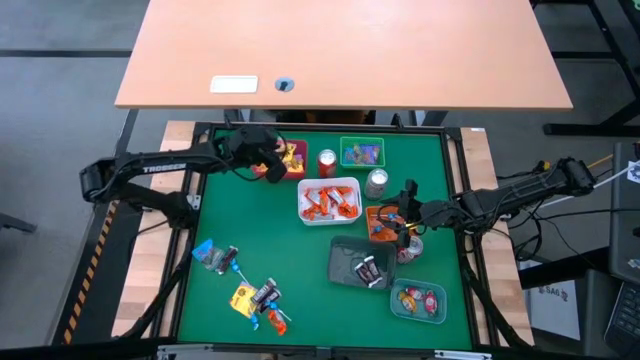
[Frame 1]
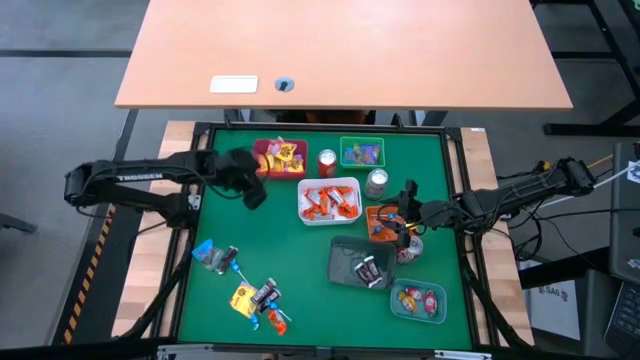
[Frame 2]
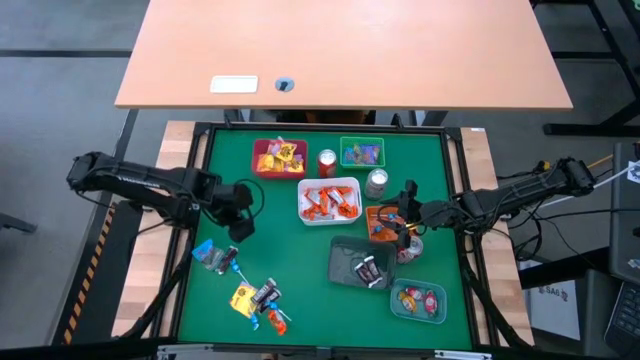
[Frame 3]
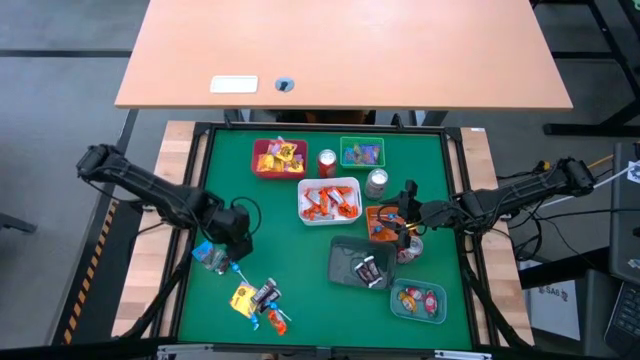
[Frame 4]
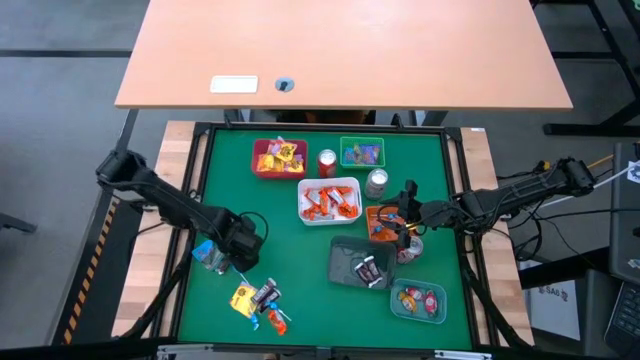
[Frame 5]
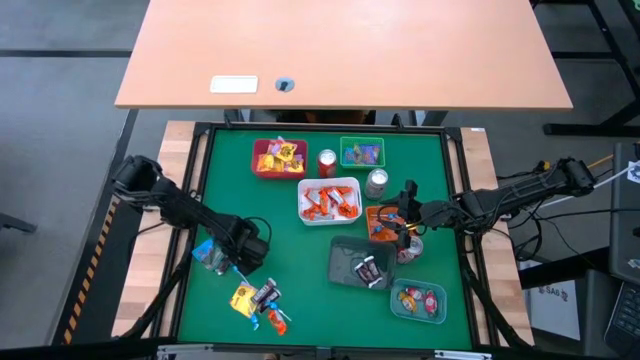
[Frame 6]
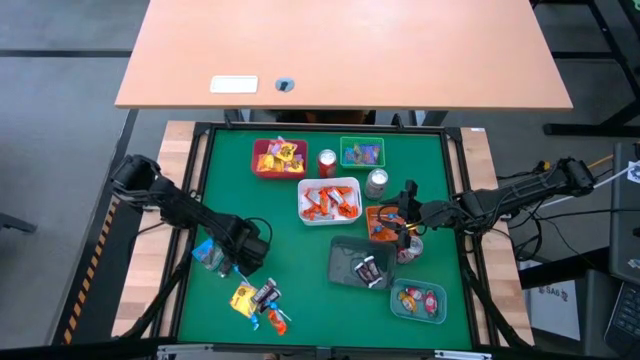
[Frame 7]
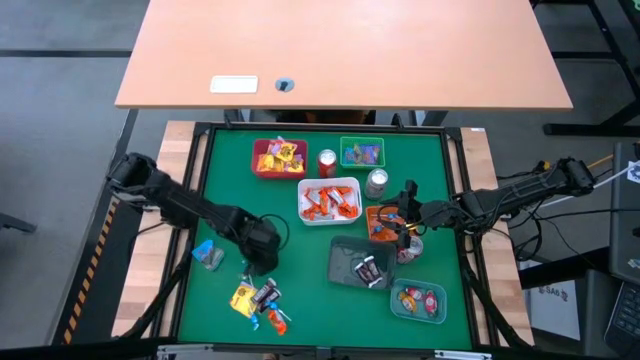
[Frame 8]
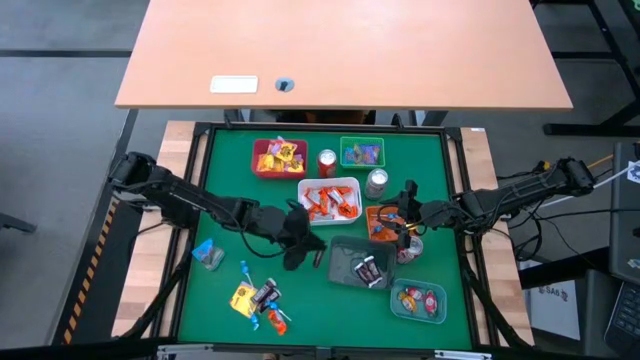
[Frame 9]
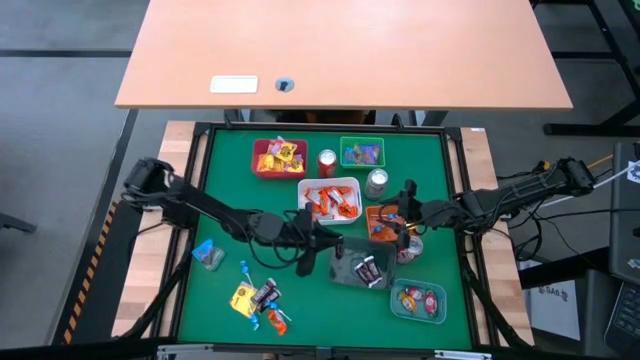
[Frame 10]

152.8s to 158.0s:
Task: Sort candy
Put the brown chocolate bar into the black bin

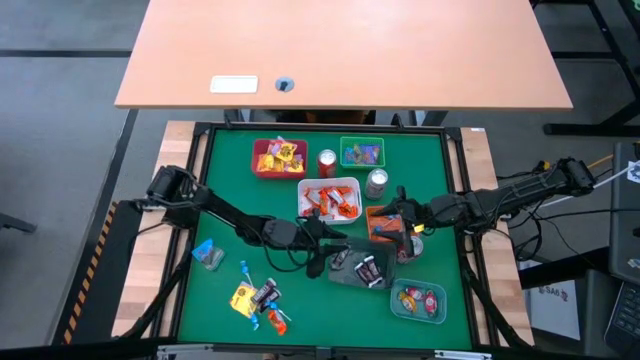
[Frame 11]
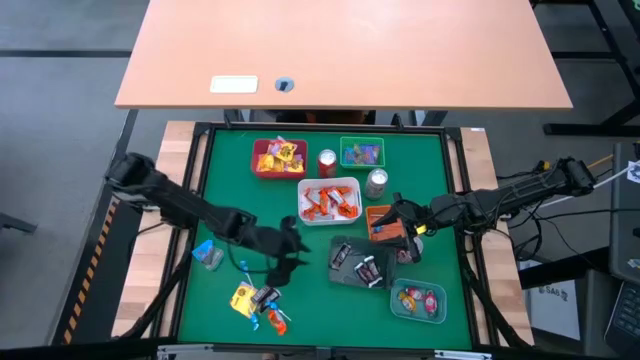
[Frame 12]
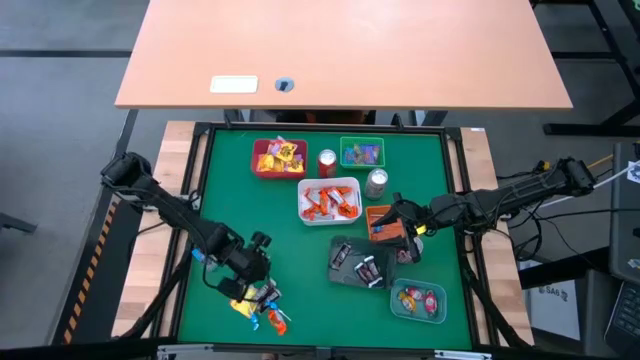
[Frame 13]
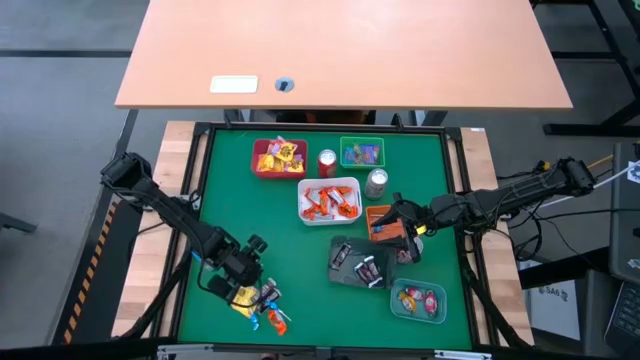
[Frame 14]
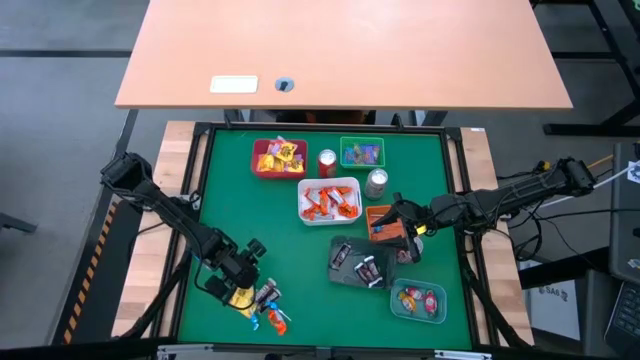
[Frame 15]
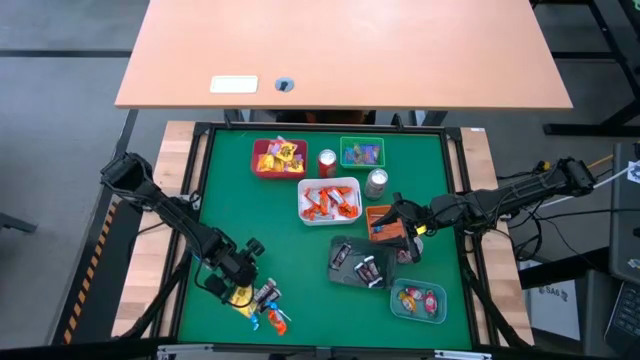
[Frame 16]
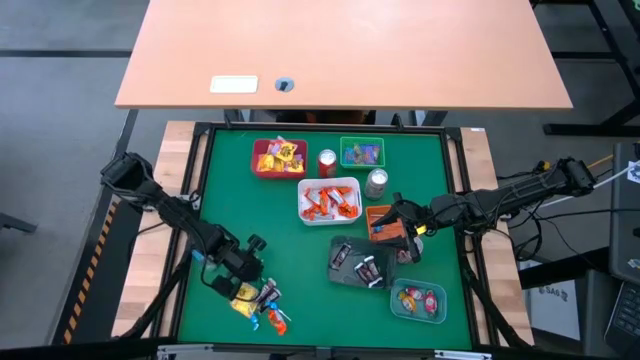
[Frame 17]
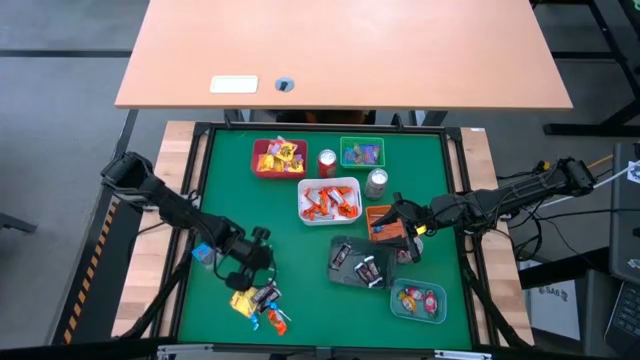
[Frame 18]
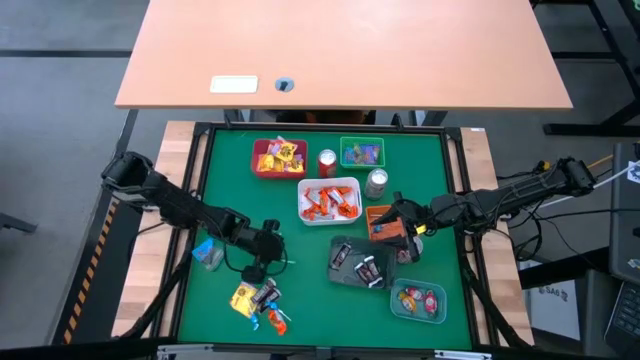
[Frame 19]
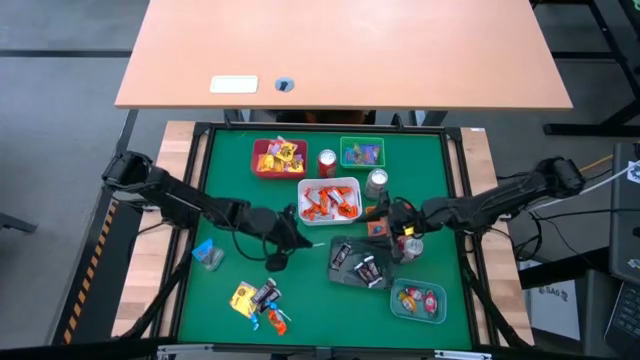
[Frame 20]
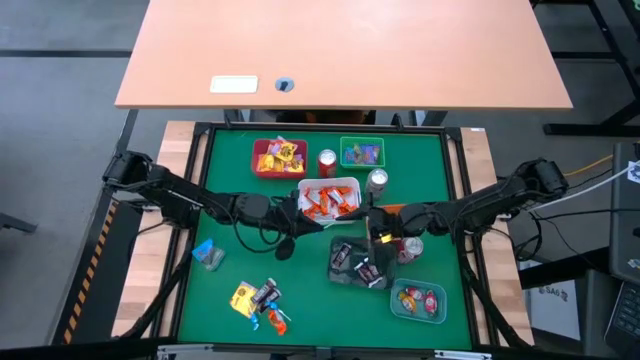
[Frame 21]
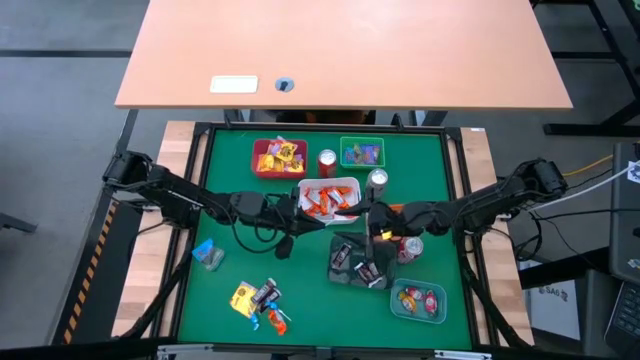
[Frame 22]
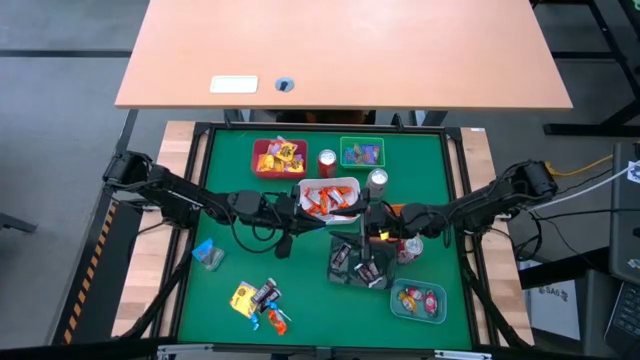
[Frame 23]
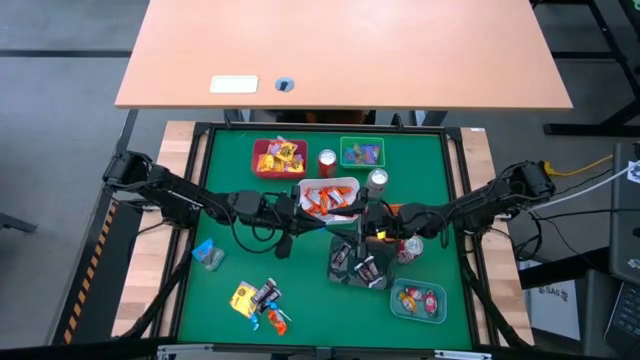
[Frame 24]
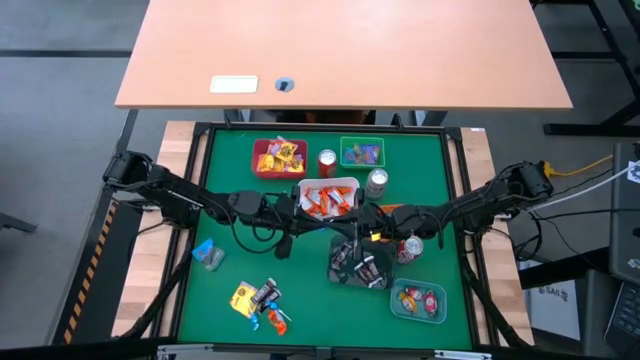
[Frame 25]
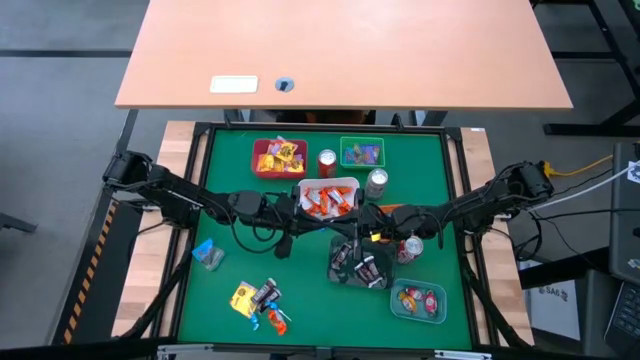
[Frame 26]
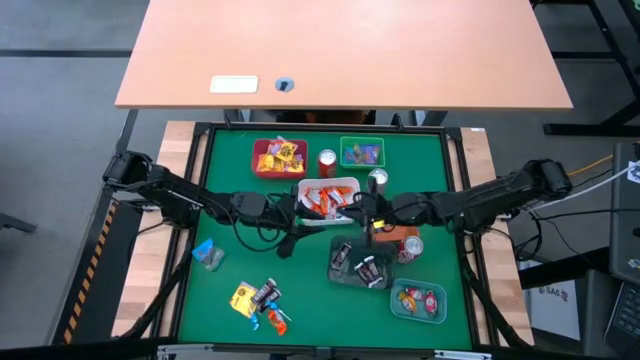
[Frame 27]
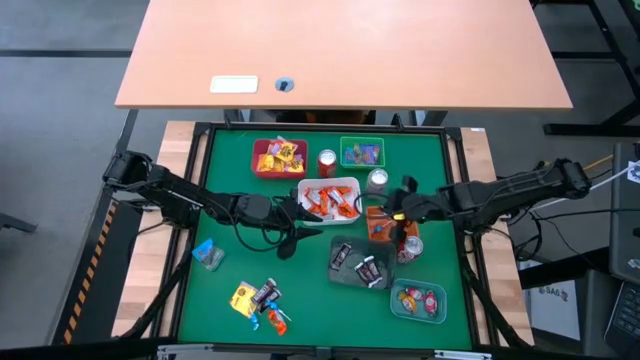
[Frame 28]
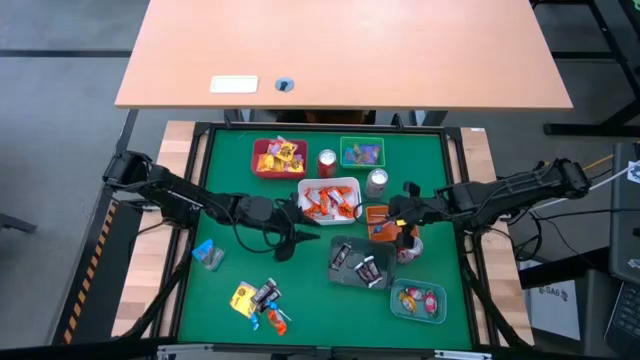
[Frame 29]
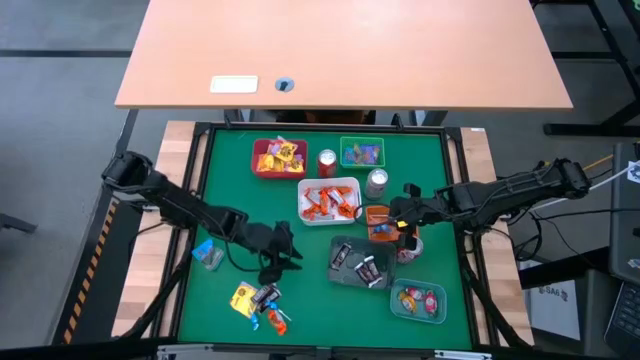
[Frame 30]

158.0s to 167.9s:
Put the light blue candy into the orange bin

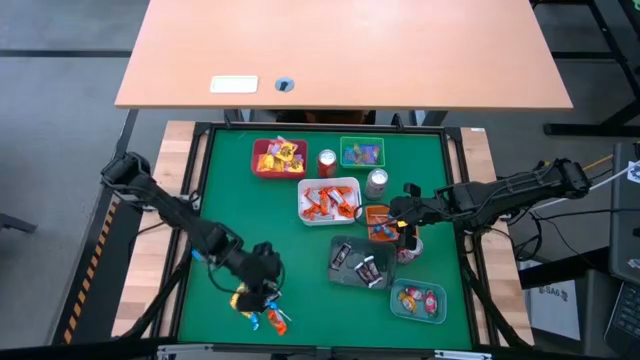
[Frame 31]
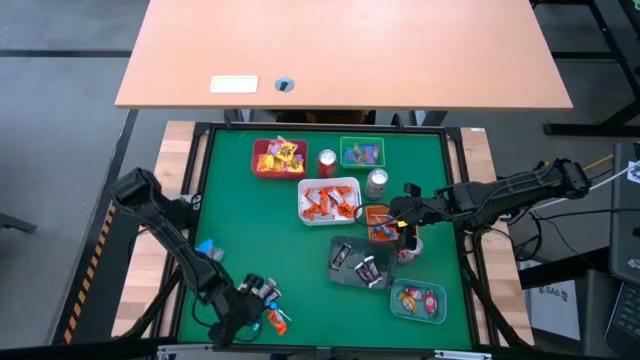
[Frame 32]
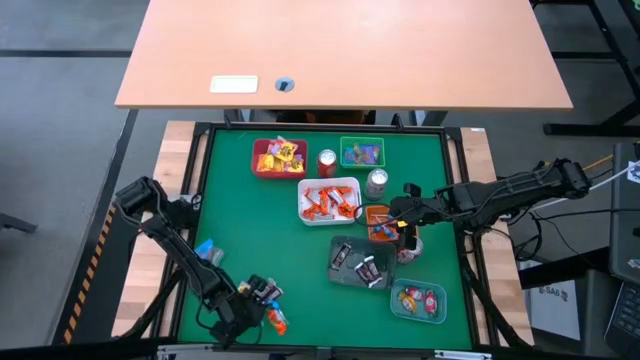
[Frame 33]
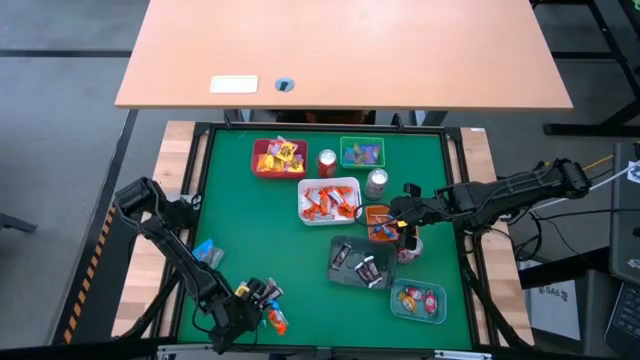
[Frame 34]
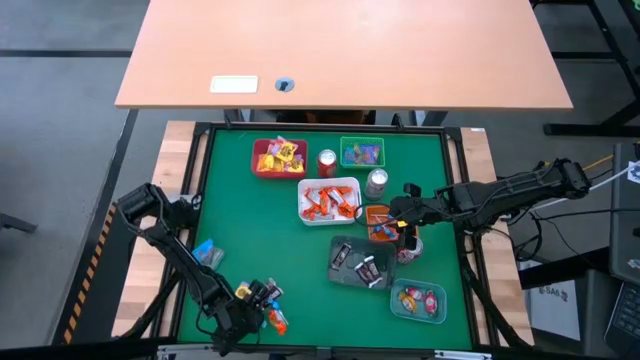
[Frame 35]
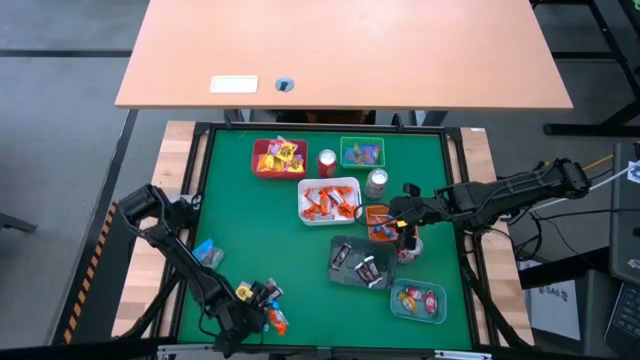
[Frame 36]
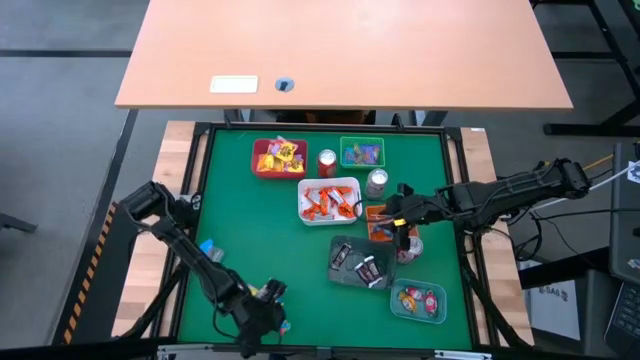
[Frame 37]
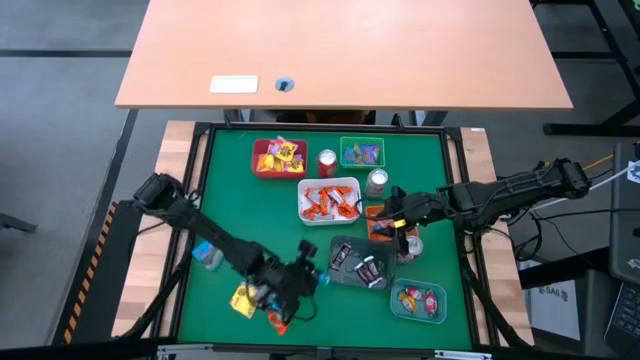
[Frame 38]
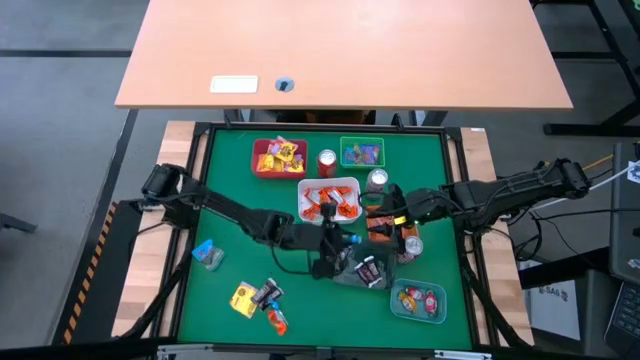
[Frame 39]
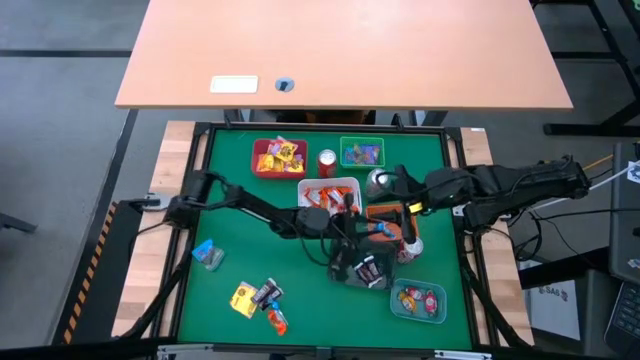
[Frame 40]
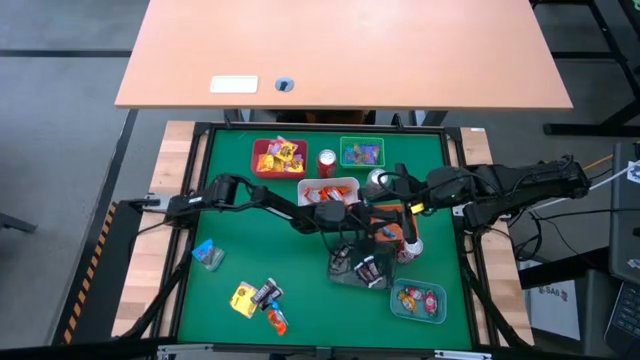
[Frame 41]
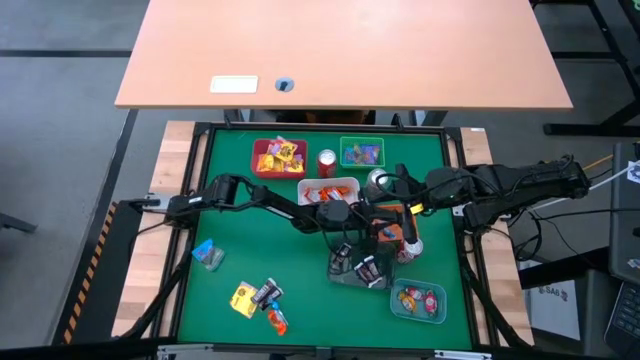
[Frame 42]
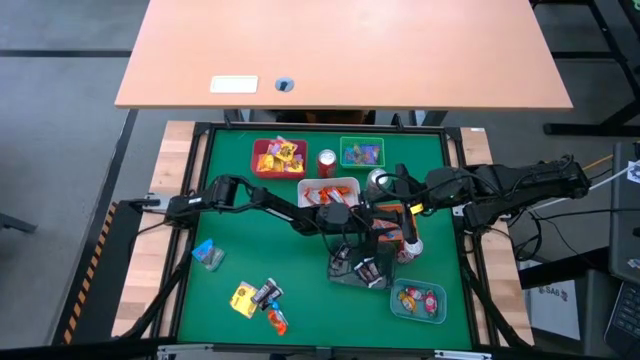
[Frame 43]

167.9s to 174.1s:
Put the light blue candy into the orange bin
